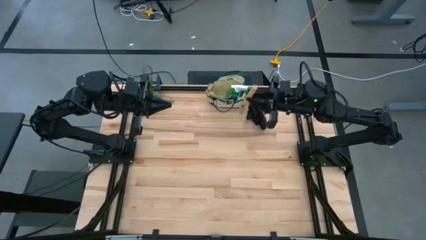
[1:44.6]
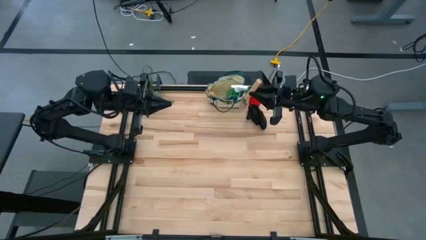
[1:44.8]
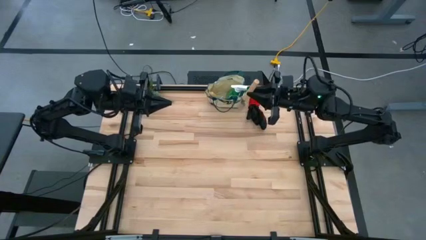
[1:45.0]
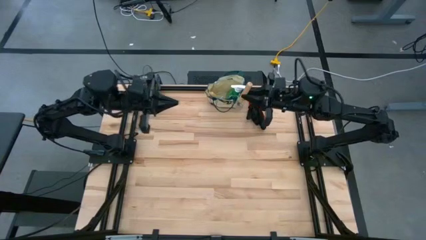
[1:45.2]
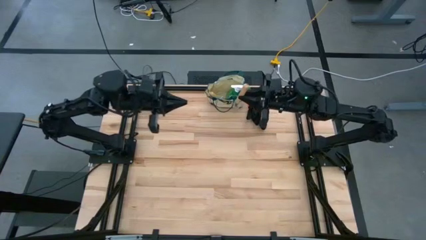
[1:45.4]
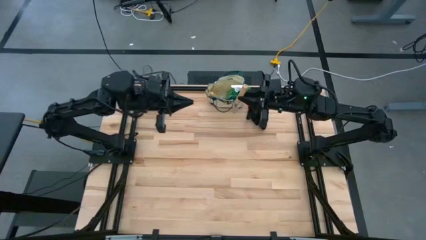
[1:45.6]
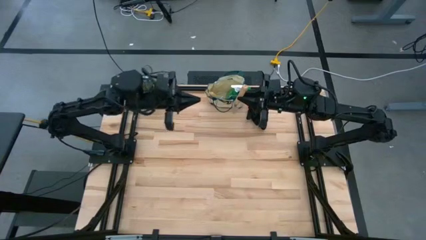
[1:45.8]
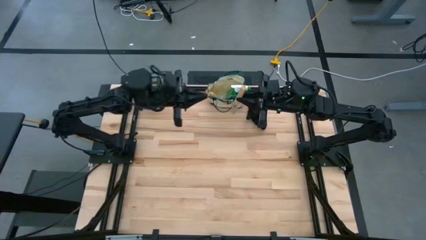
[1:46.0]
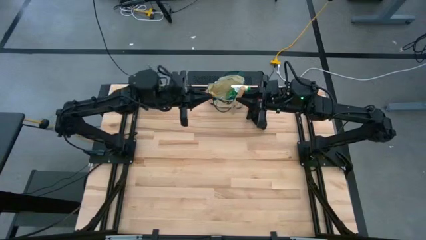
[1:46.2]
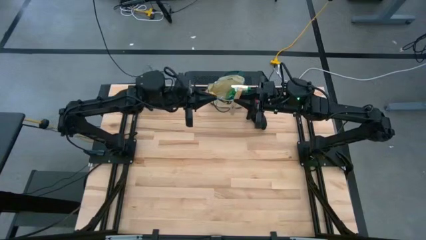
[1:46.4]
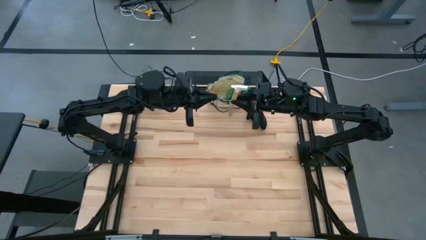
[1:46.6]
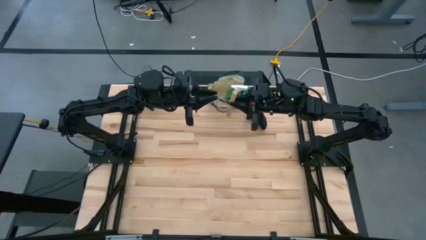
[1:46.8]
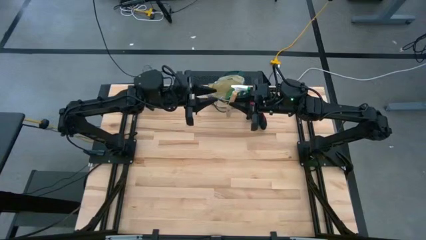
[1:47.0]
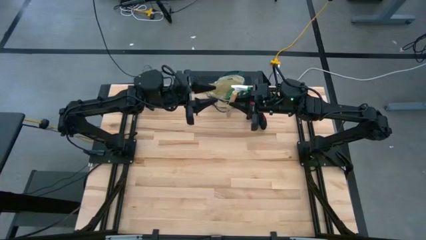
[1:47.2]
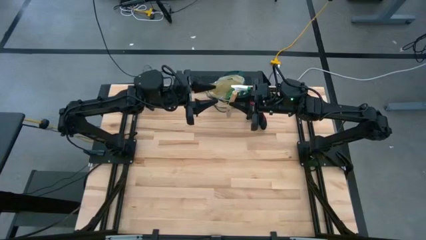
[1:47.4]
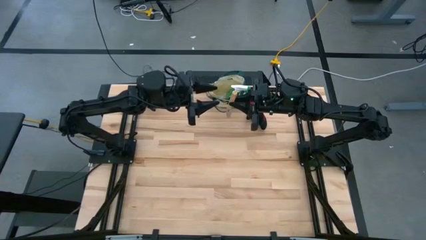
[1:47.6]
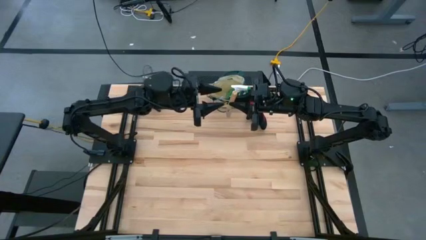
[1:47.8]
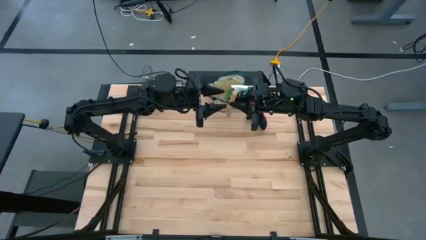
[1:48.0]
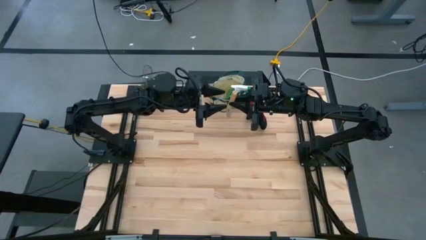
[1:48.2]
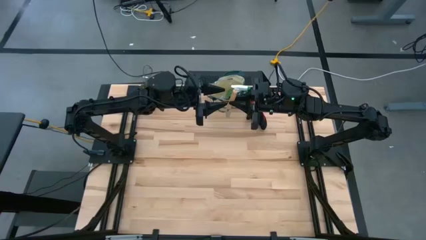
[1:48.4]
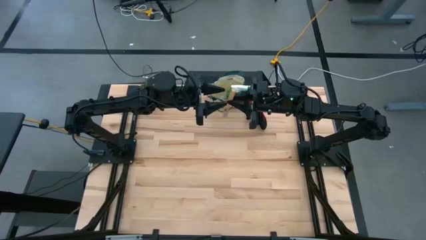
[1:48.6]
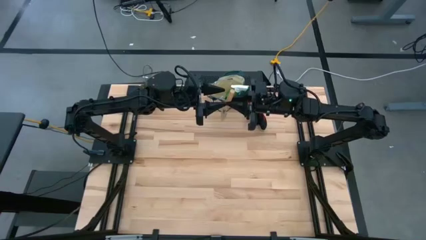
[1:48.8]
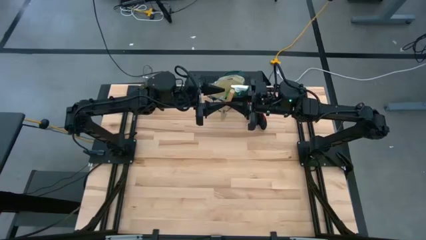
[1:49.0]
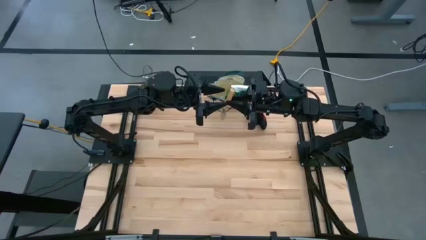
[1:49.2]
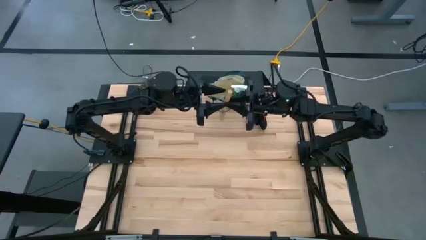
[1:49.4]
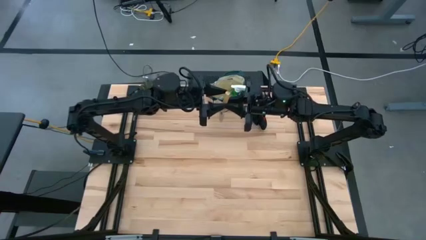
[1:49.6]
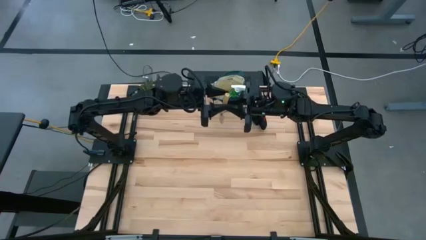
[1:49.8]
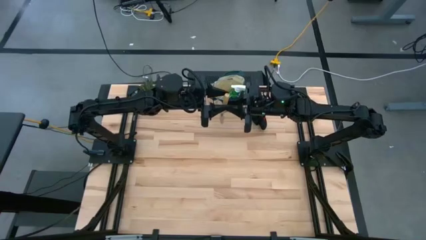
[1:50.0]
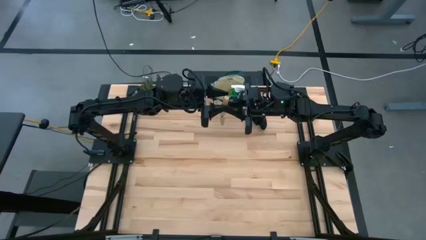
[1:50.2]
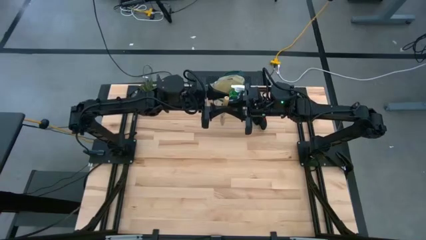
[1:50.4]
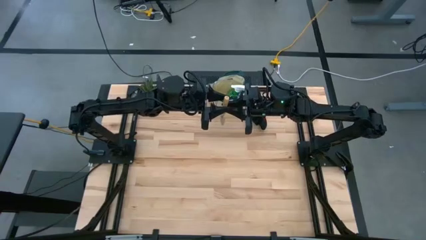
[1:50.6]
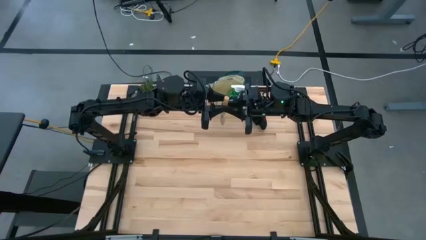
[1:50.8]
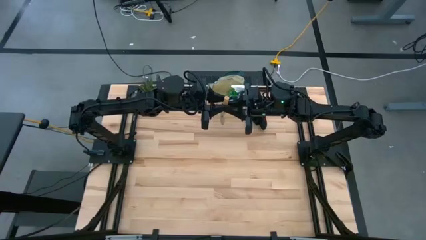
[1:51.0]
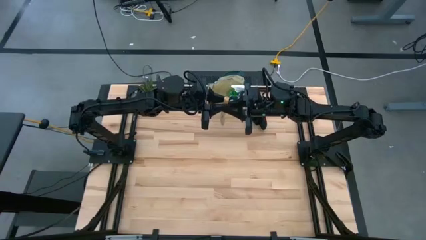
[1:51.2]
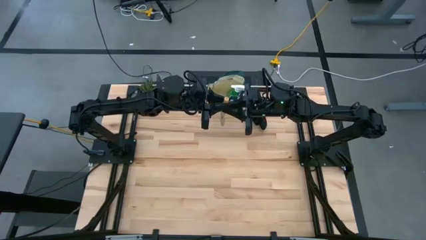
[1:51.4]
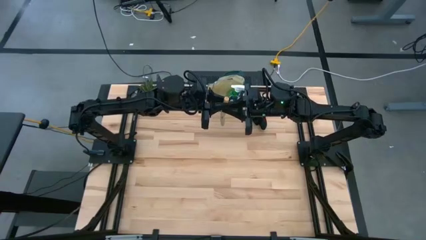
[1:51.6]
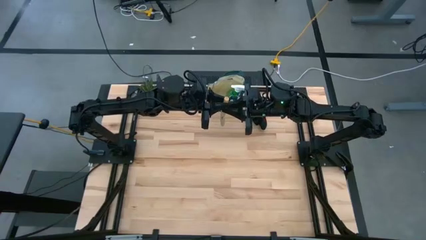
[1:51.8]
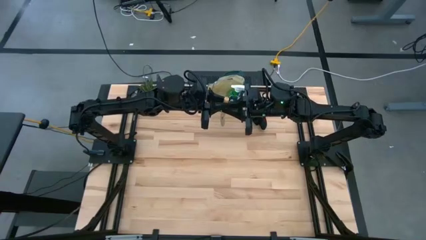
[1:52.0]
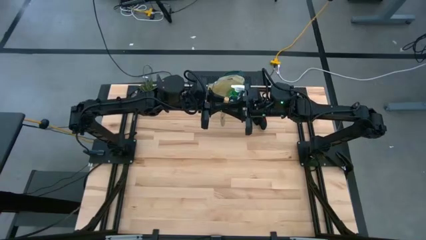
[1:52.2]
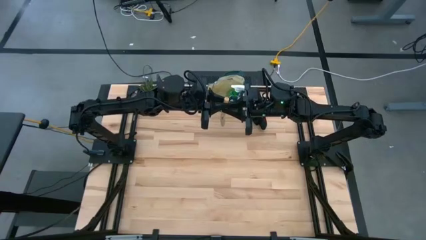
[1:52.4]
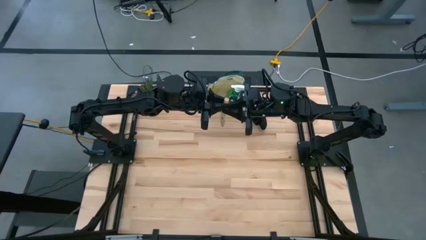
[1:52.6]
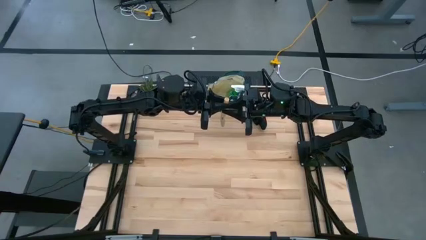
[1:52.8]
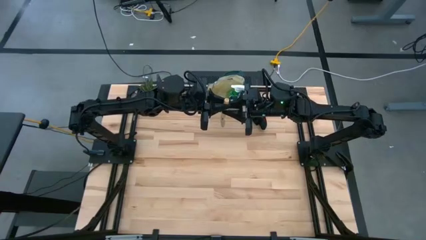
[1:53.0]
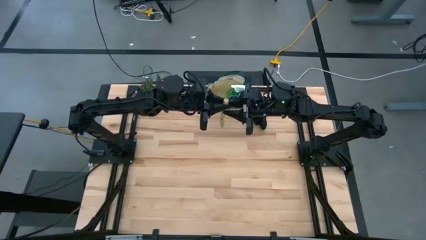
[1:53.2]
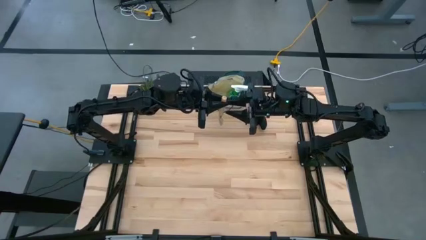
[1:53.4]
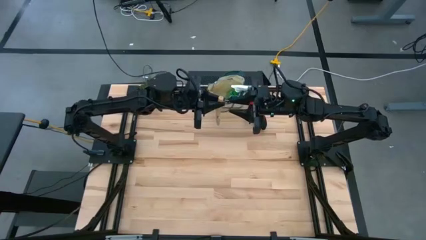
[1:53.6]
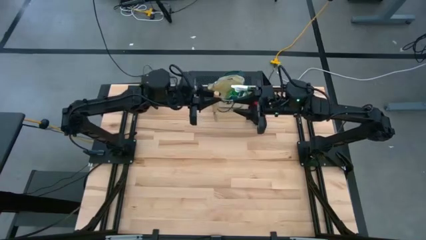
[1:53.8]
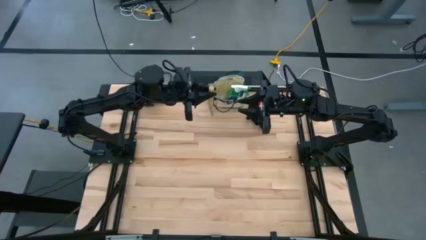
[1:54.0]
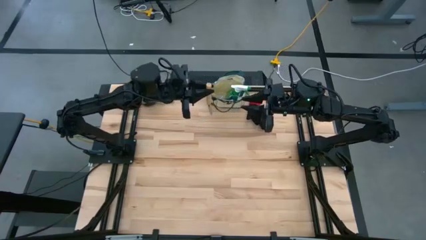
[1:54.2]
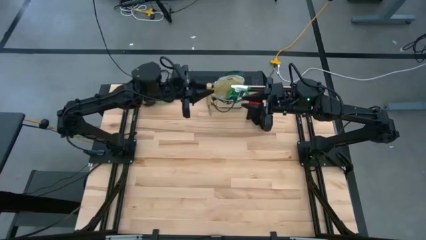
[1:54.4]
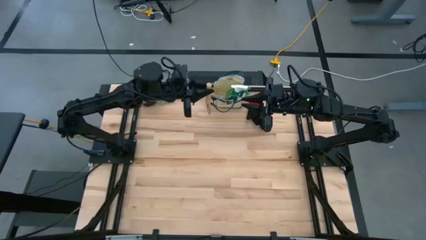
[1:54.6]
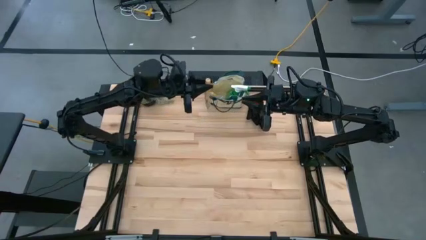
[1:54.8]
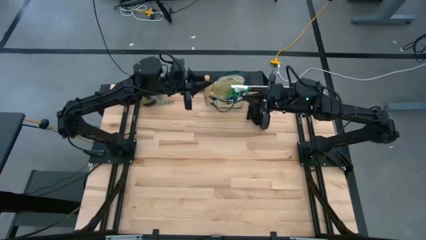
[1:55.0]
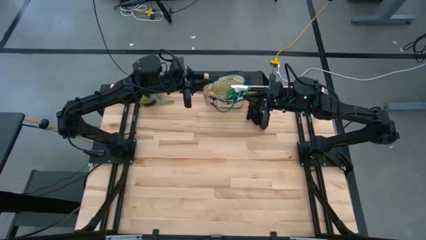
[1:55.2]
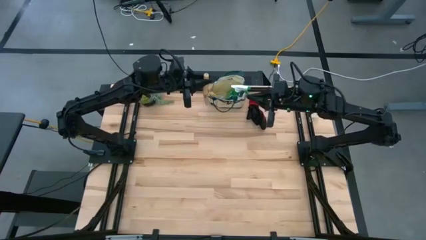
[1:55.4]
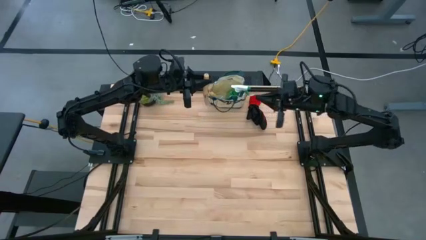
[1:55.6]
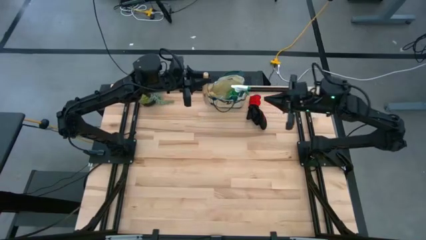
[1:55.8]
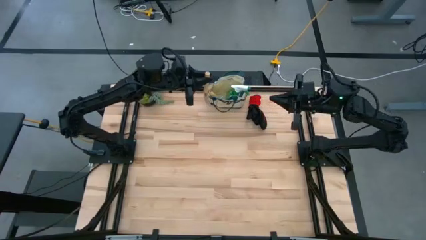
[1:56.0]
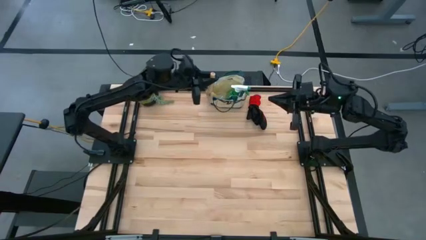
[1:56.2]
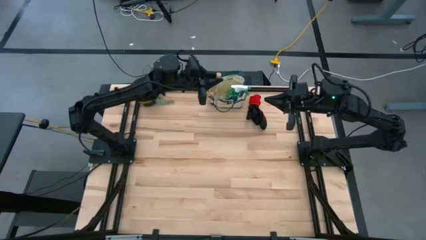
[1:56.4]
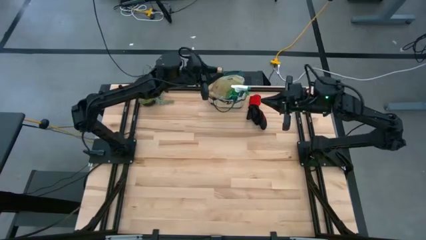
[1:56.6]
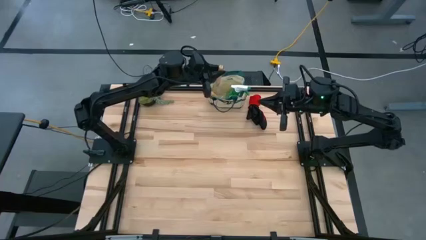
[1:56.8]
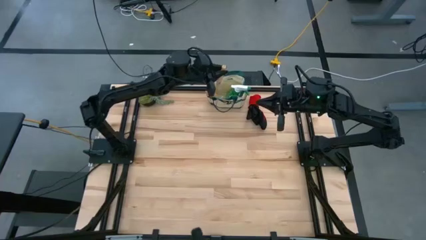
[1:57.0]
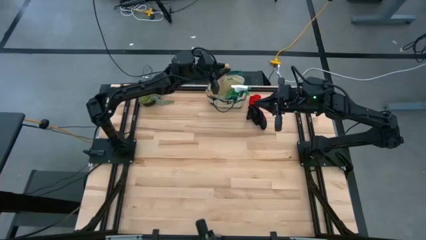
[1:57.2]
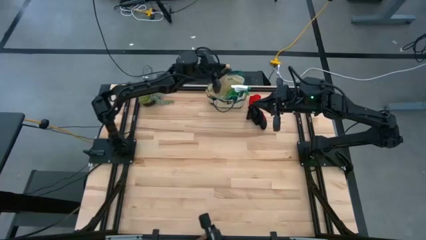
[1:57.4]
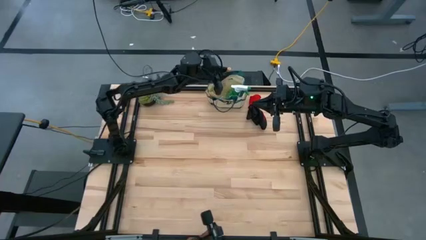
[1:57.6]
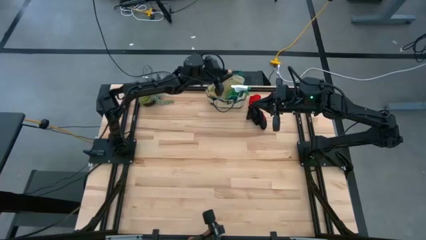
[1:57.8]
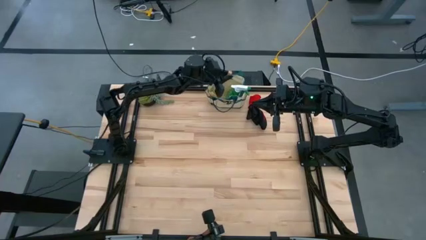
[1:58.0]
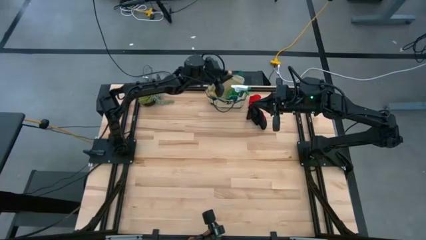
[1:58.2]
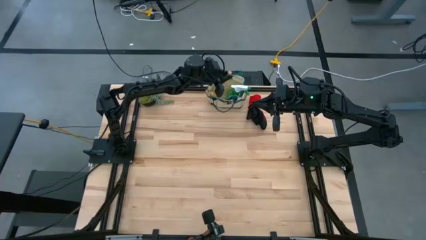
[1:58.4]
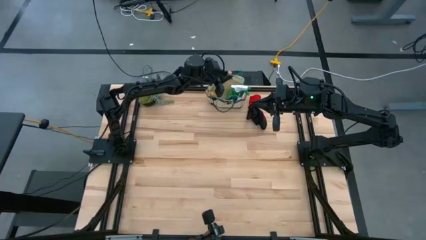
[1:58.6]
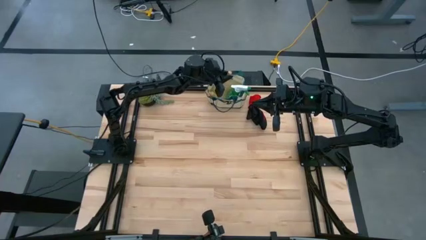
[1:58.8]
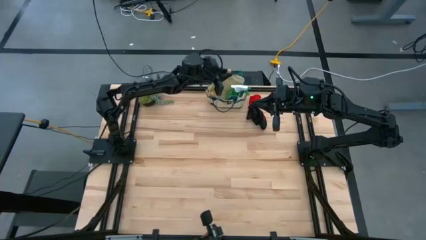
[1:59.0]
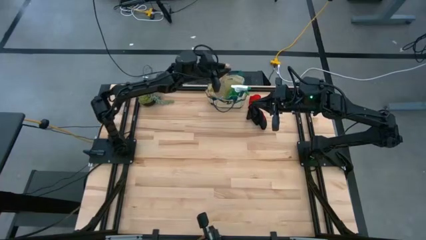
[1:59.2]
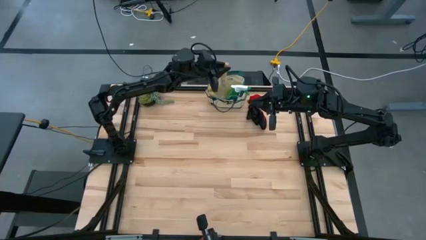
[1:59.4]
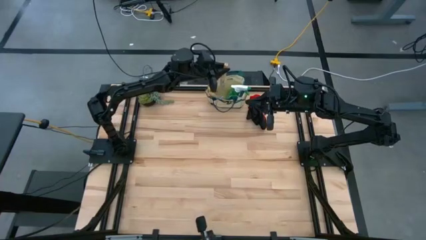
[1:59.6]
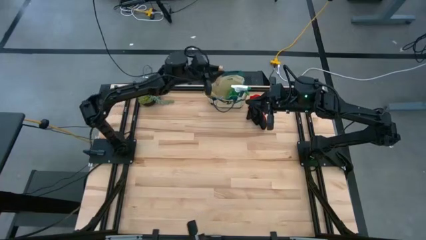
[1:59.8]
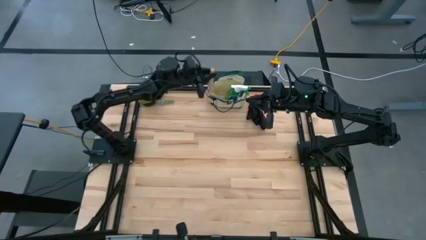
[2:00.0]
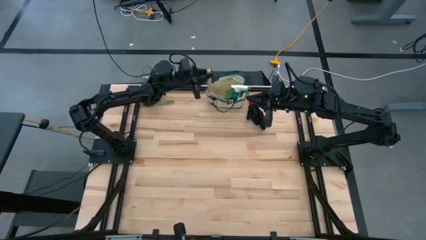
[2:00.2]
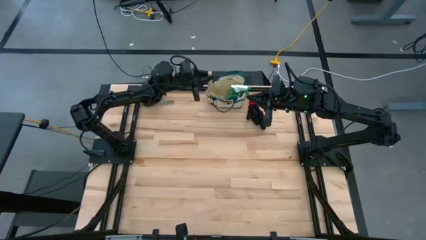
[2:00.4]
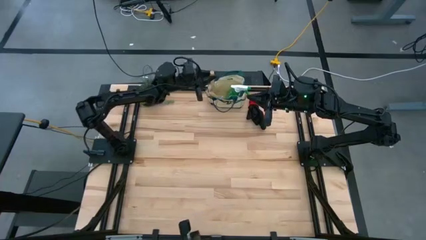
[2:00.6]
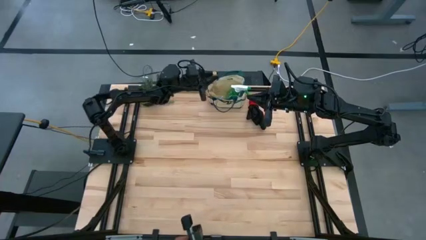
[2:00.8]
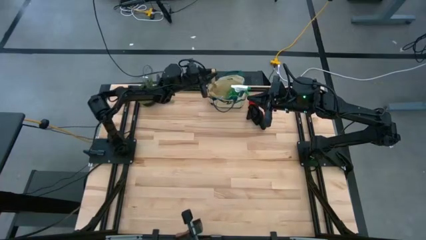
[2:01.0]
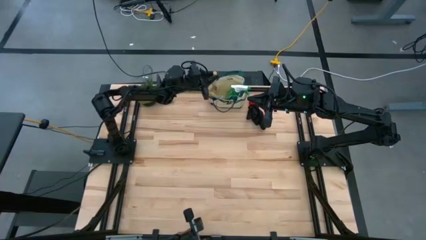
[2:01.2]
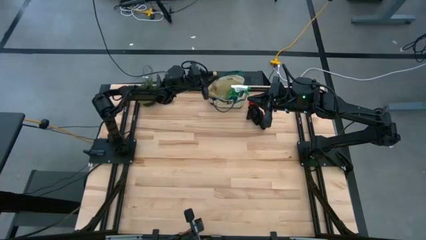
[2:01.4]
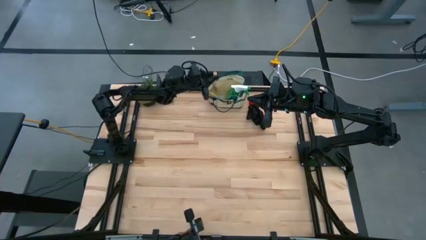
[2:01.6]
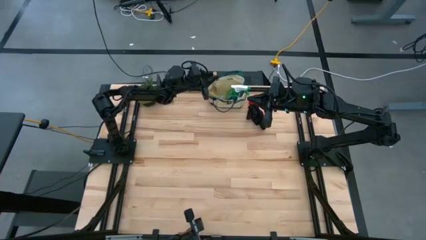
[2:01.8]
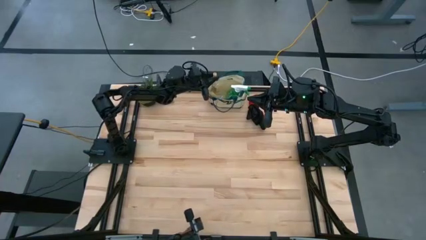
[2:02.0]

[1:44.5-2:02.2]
Task: Pick & Place Garden tools in Gardening bag
Put the brown trowel into the white gardening bag
